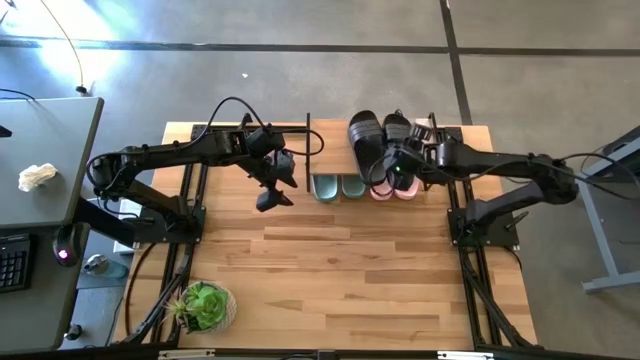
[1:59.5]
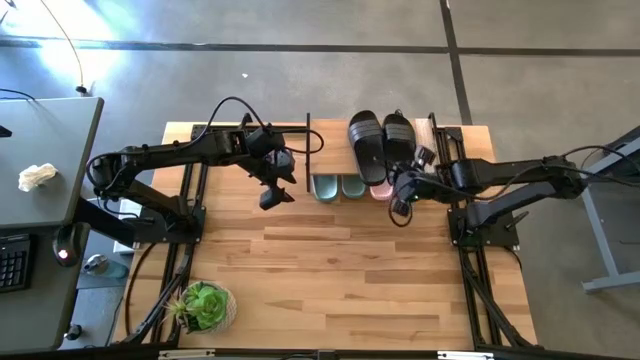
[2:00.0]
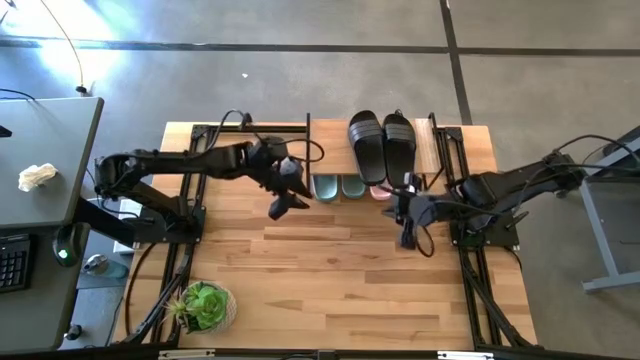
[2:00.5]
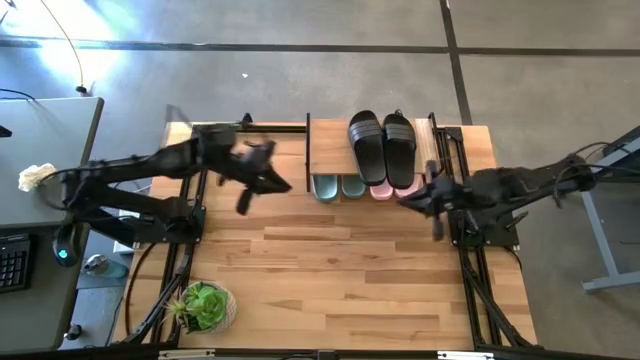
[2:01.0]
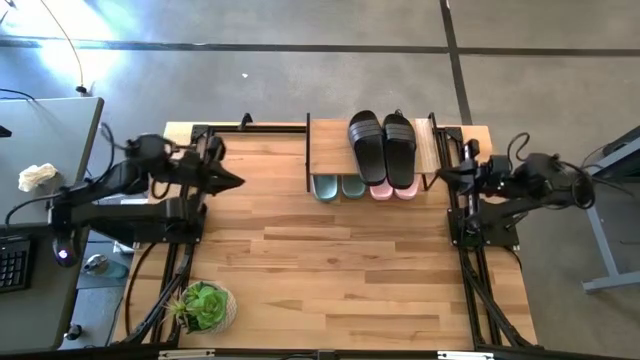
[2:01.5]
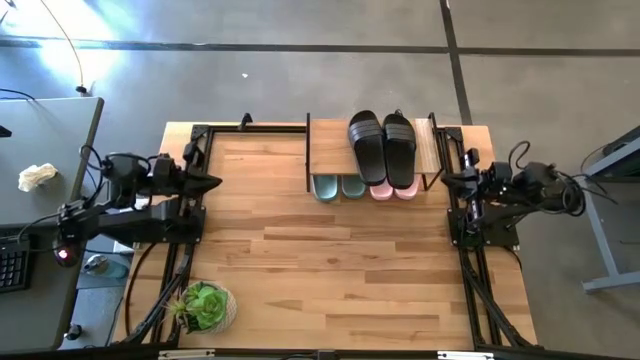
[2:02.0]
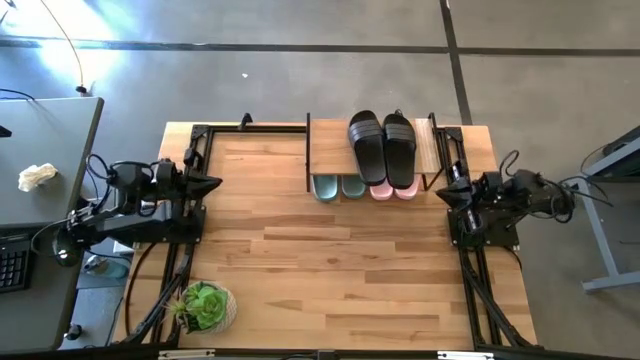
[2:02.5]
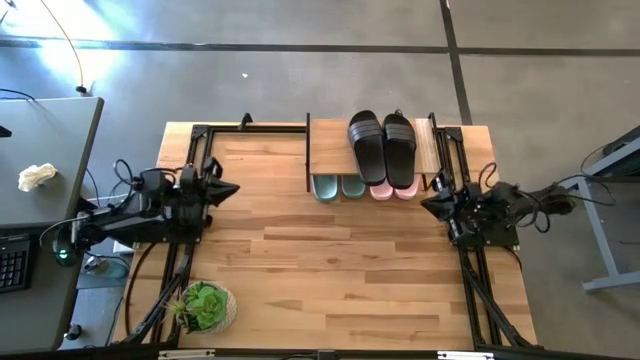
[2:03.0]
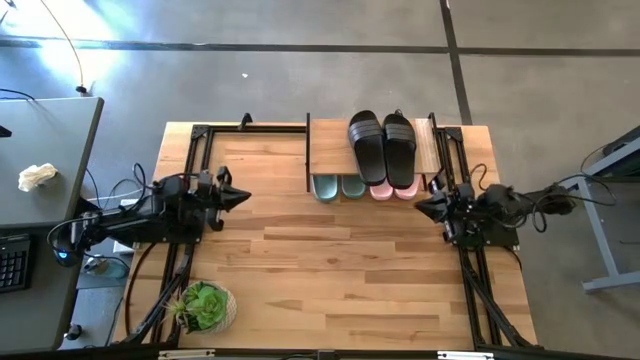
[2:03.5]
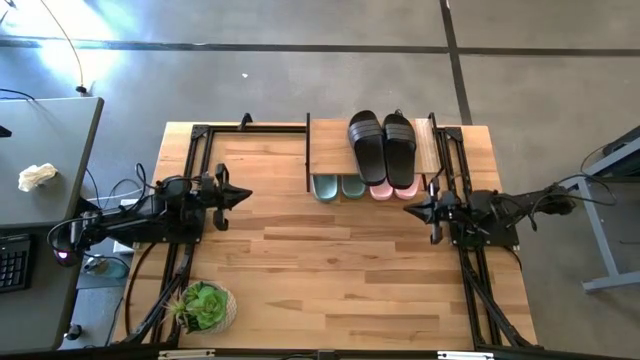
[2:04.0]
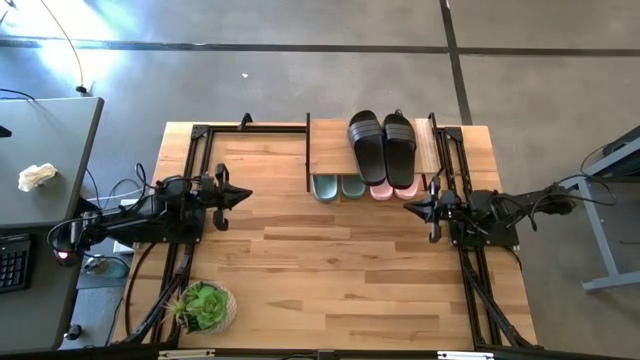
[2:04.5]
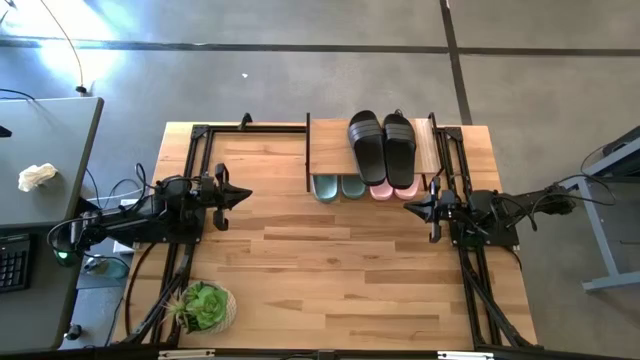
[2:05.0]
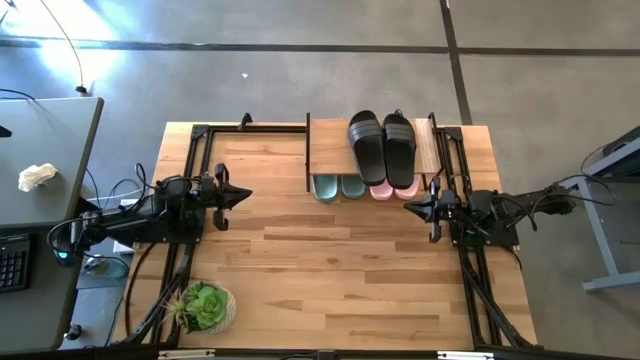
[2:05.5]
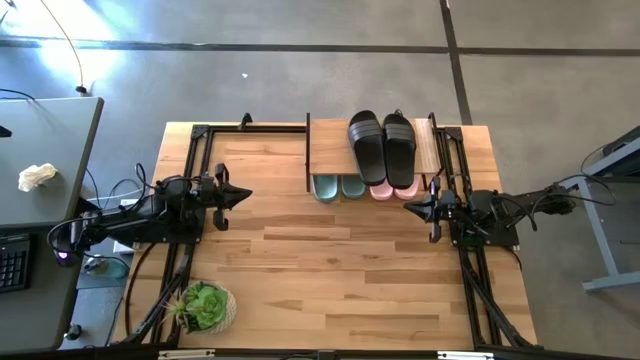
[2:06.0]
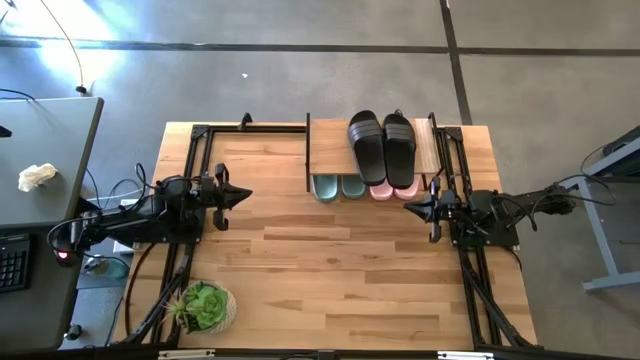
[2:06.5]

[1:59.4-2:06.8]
Task: Pick and place slides into the shelf
Return to Home Position

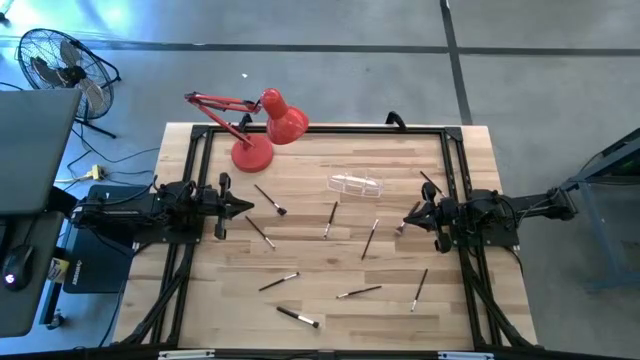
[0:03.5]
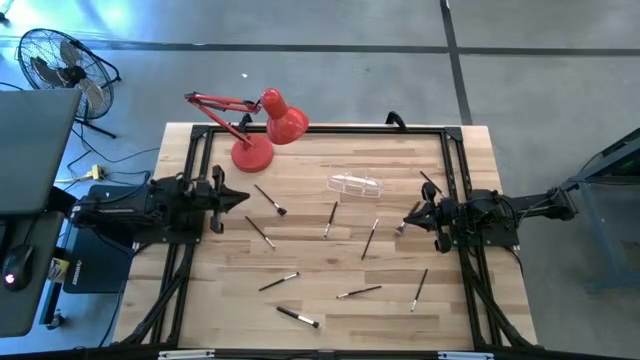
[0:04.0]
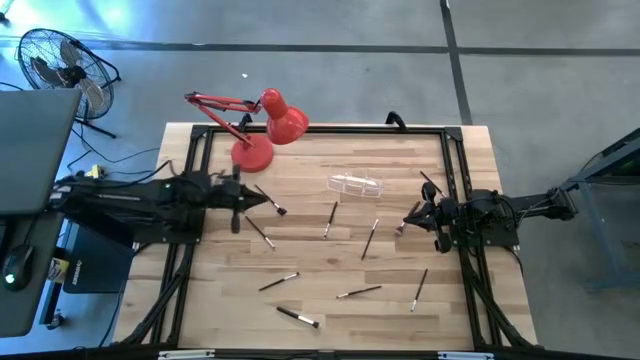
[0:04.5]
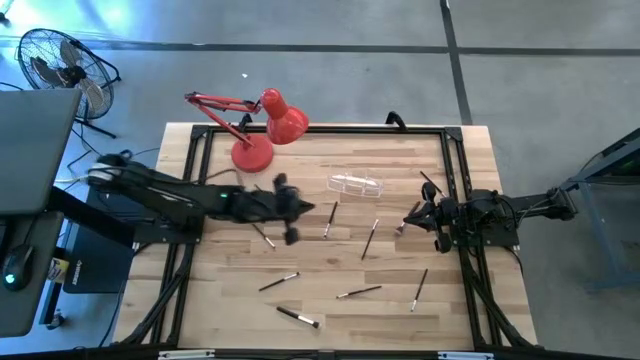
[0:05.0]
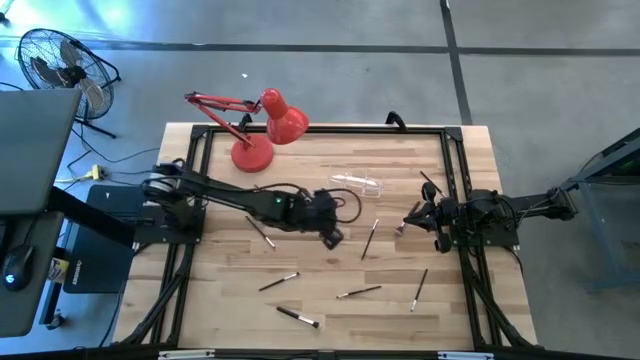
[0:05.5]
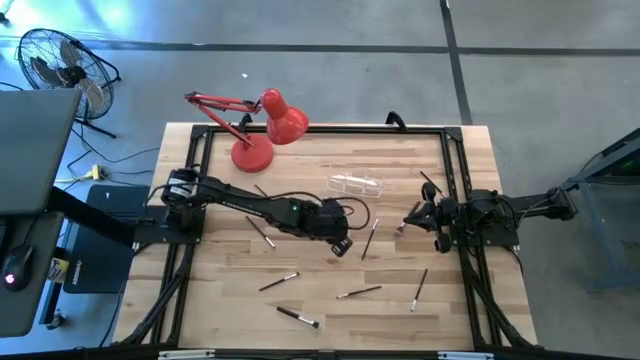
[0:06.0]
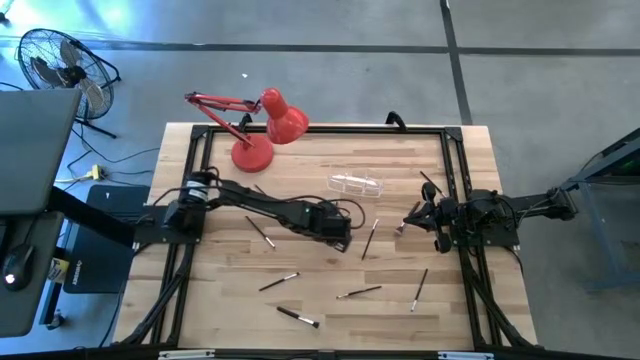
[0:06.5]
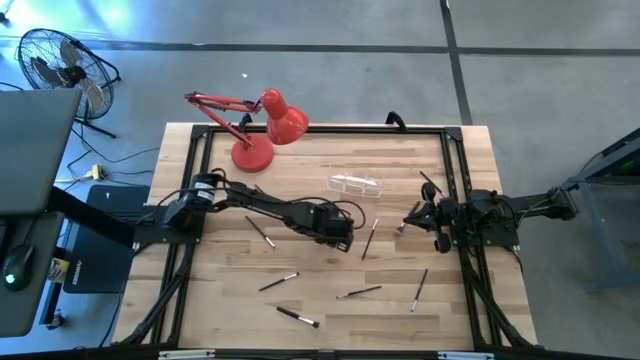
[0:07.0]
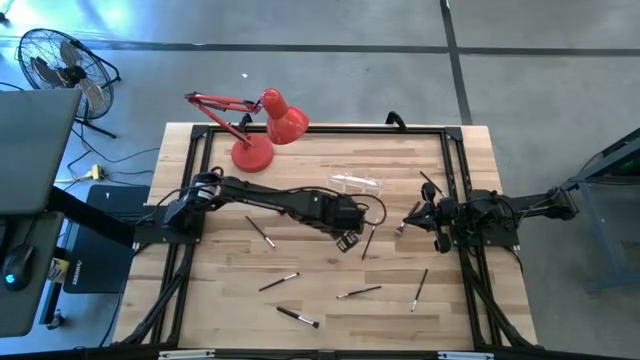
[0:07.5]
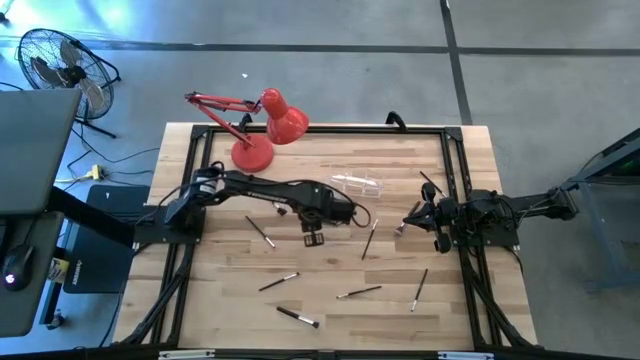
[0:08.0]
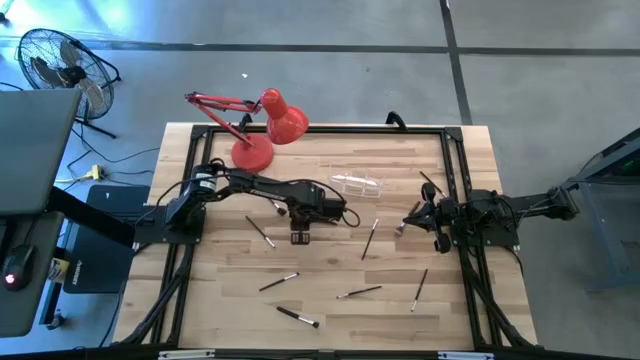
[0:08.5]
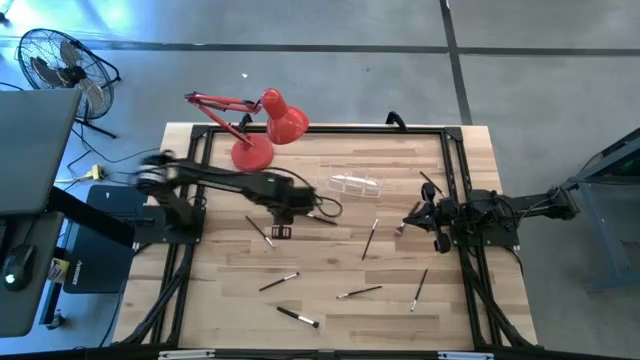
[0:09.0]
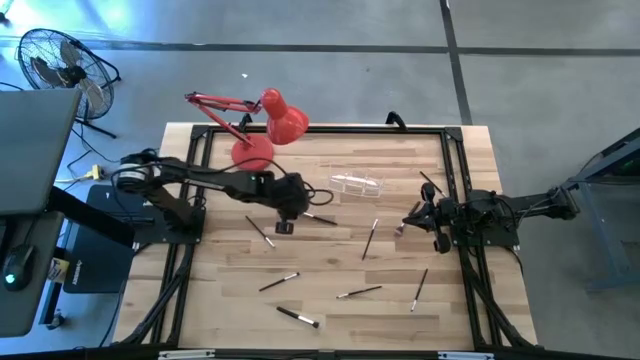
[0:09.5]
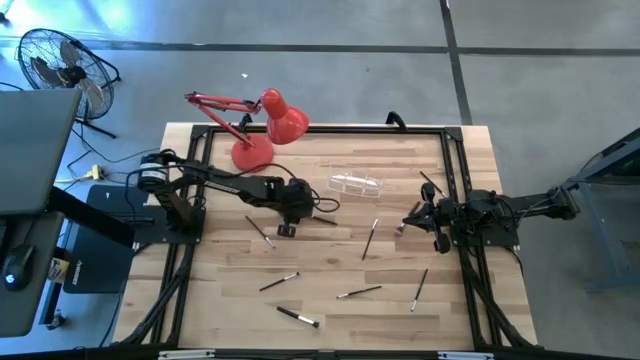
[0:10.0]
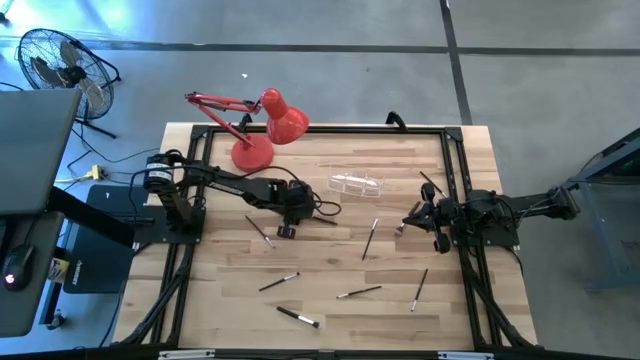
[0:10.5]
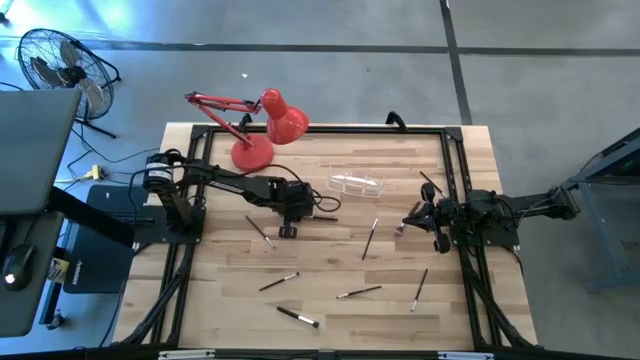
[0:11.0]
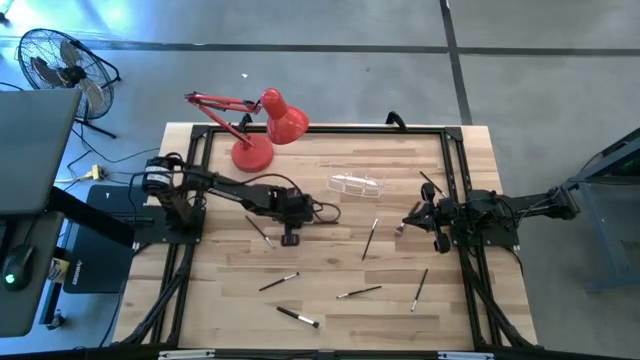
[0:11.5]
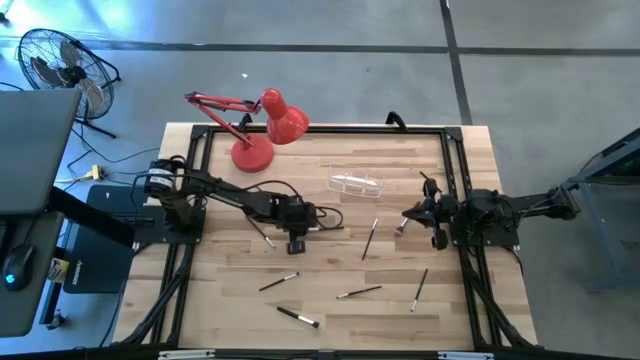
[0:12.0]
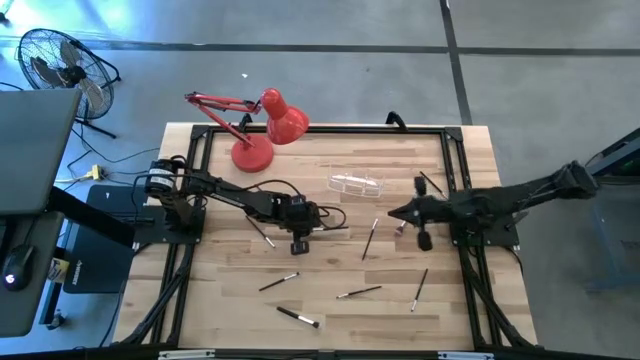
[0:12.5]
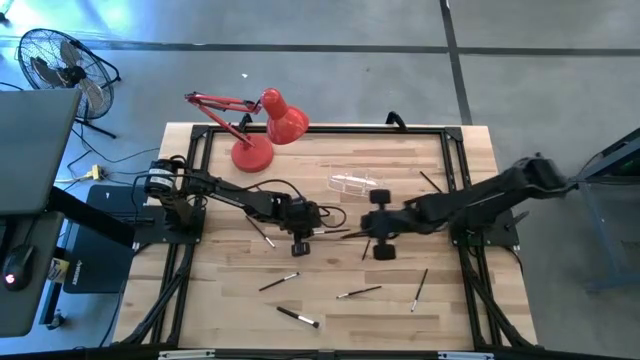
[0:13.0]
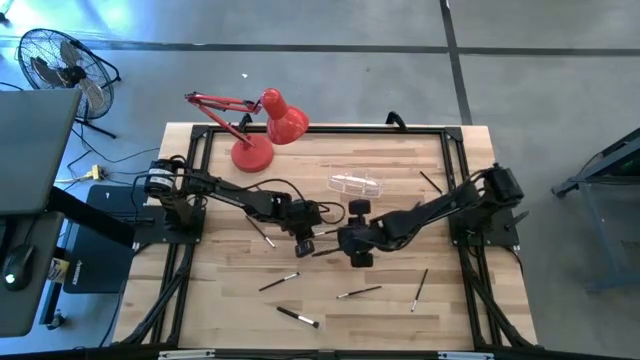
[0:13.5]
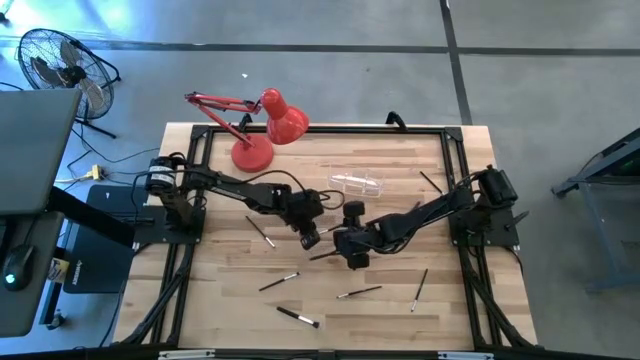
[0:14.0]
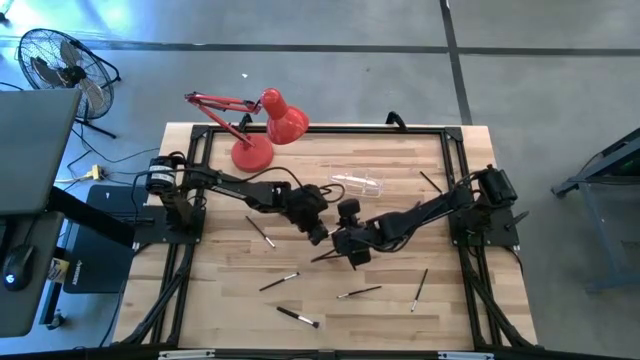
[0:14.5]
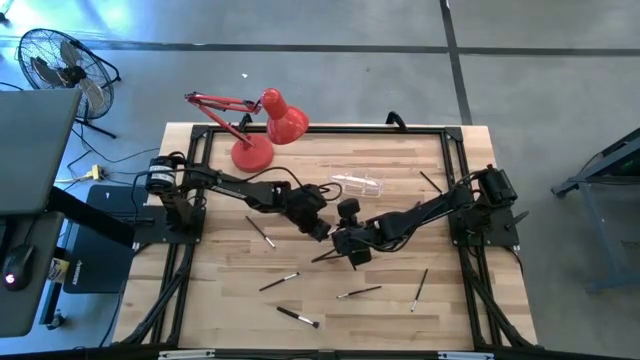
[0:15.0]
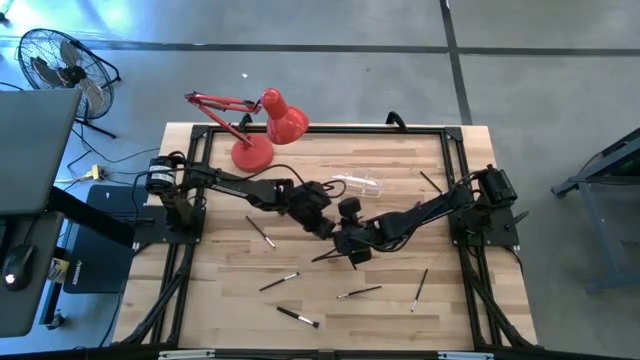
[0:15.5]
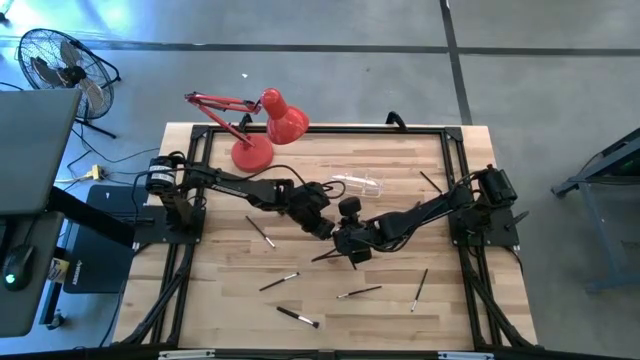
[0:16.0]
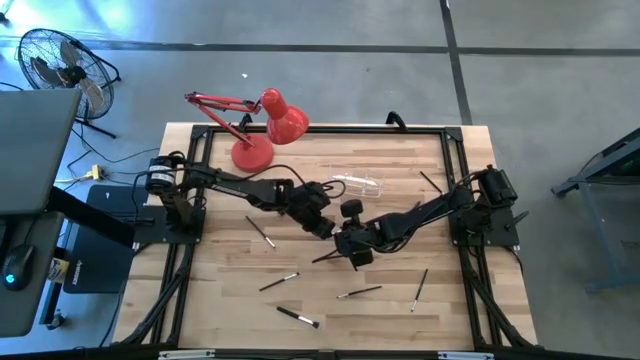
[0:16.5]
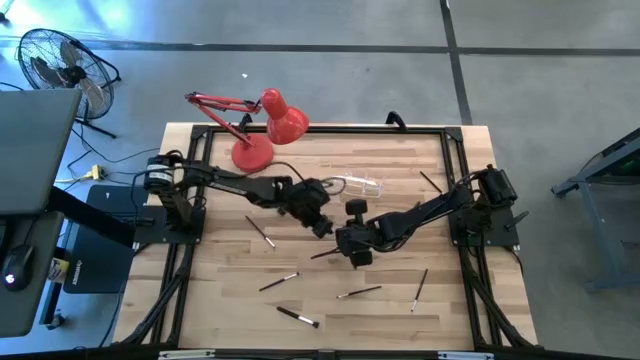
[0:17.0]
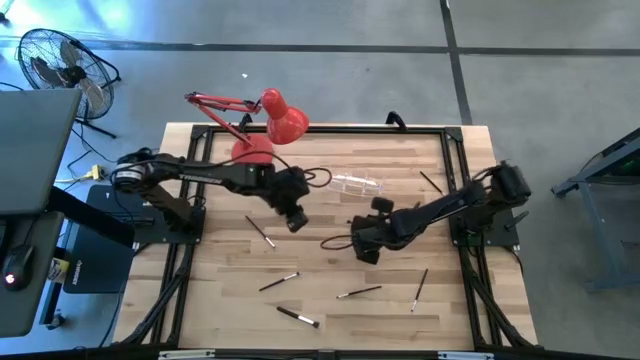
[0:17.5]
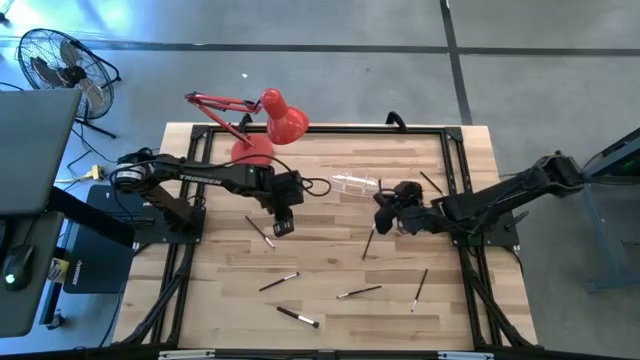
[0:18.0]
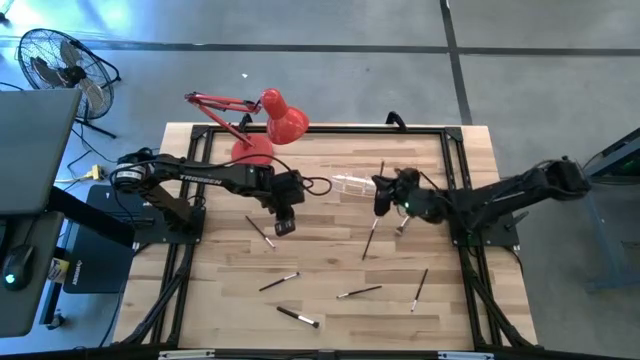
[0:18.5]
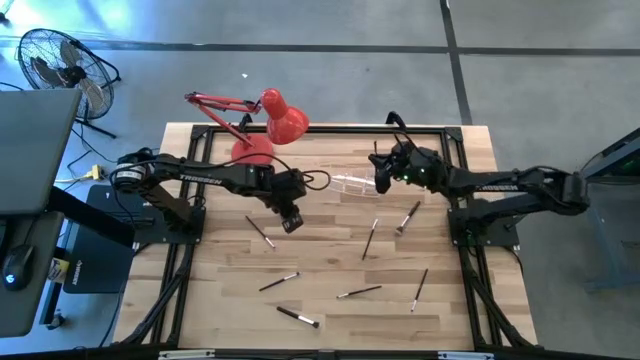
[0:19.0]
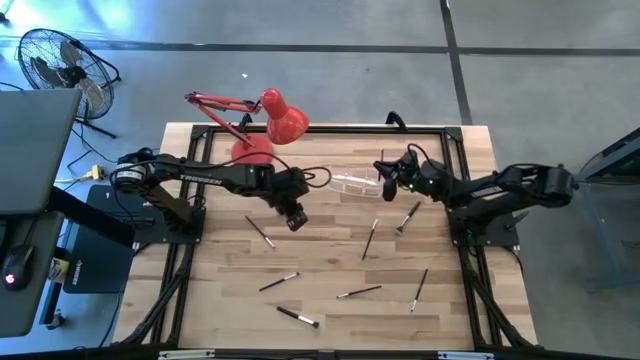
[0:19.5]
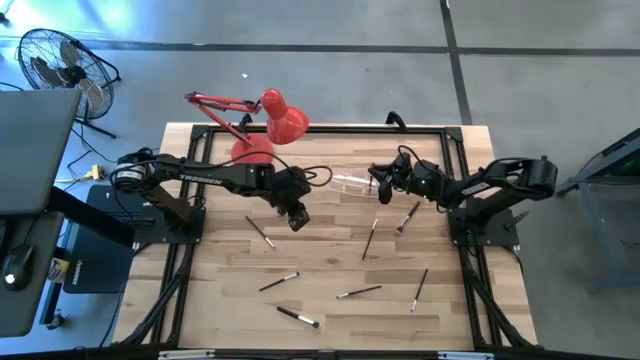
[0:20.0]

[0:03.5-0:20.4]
Task: Put items in baskets/containers
Put the eyeshadow brush into the transparent organizer
